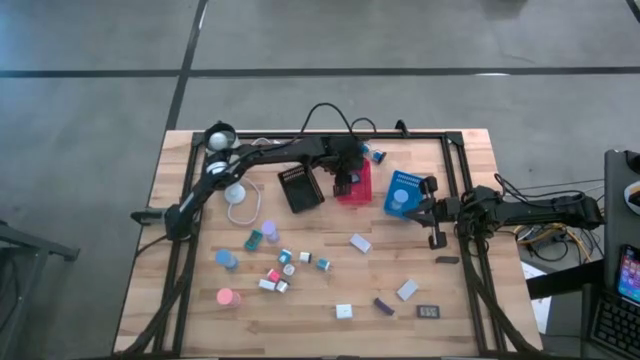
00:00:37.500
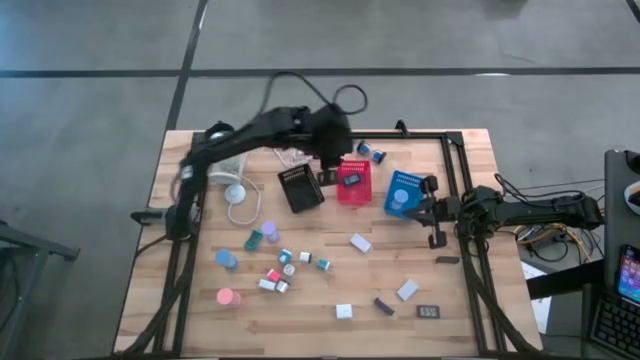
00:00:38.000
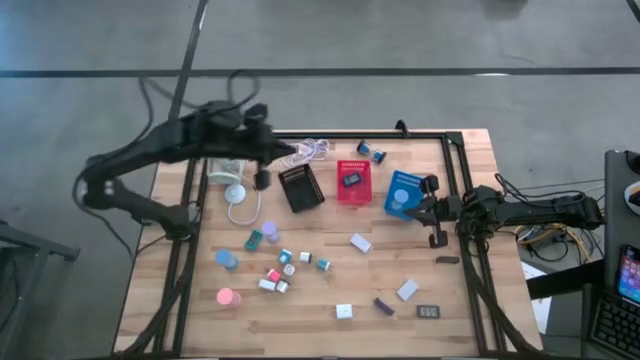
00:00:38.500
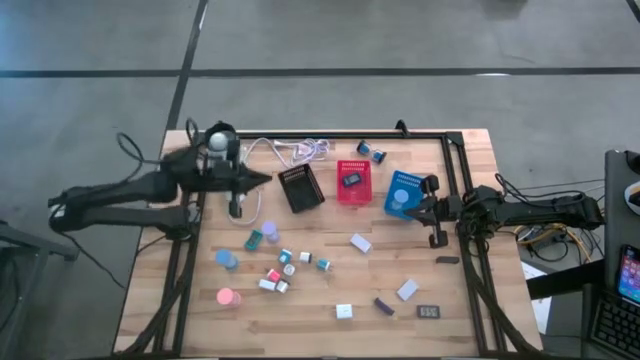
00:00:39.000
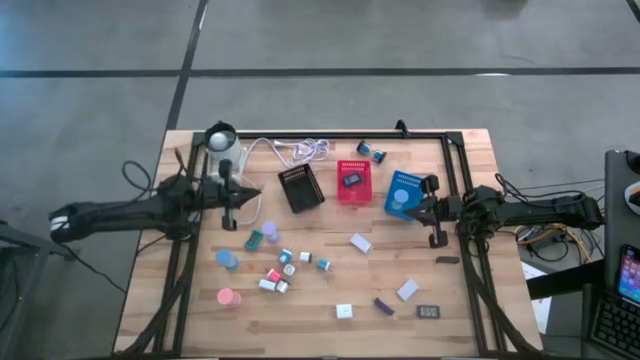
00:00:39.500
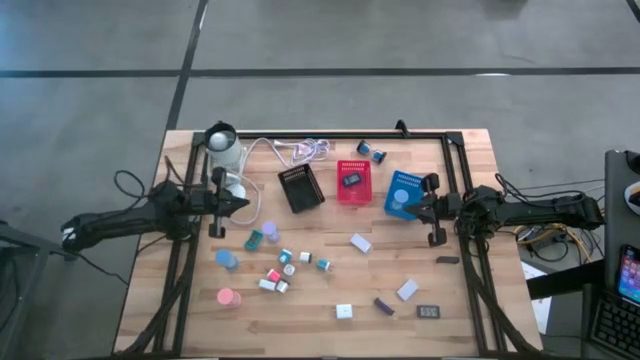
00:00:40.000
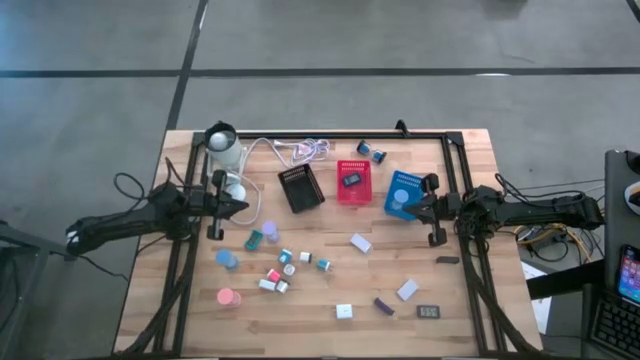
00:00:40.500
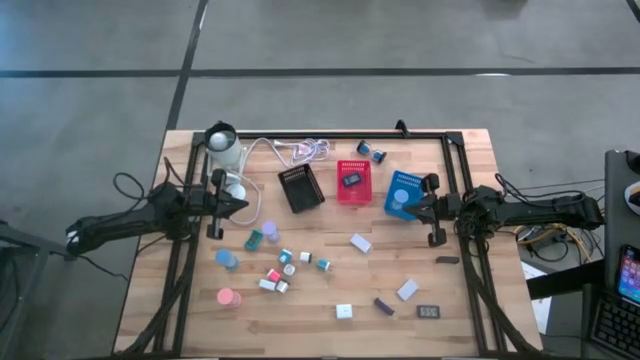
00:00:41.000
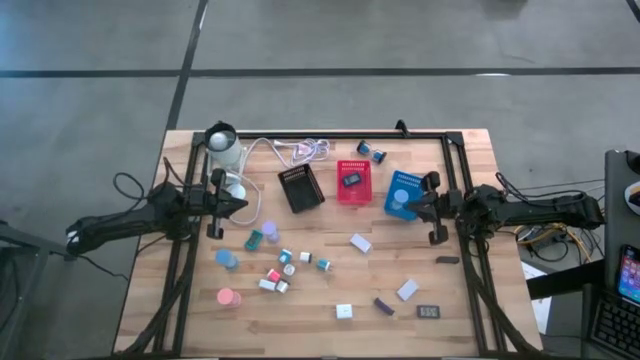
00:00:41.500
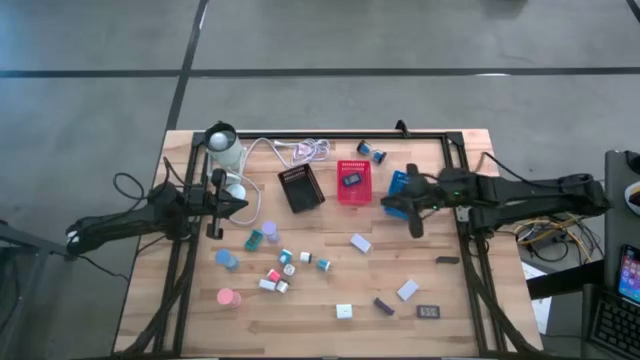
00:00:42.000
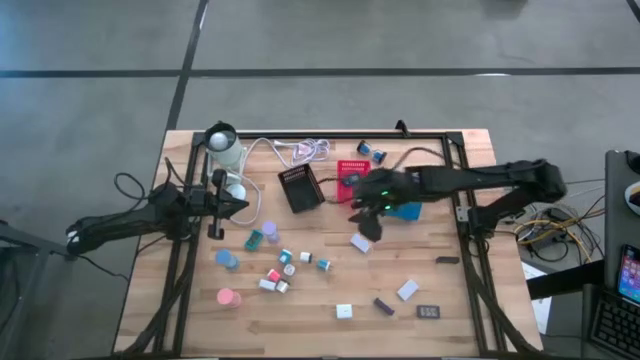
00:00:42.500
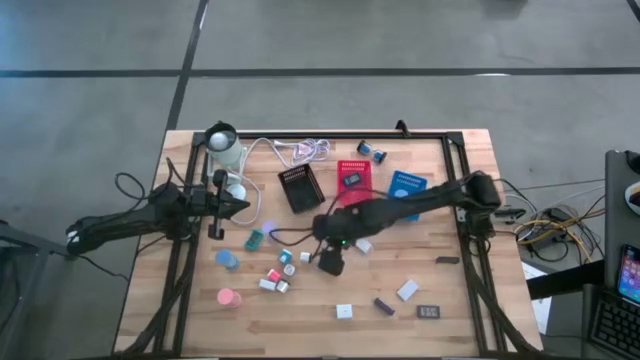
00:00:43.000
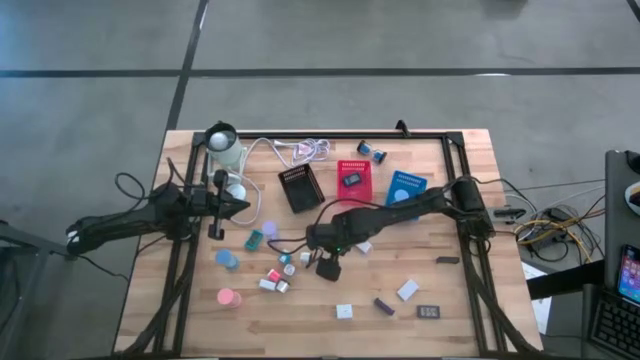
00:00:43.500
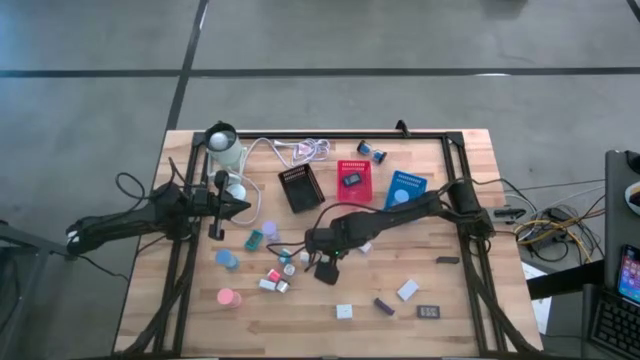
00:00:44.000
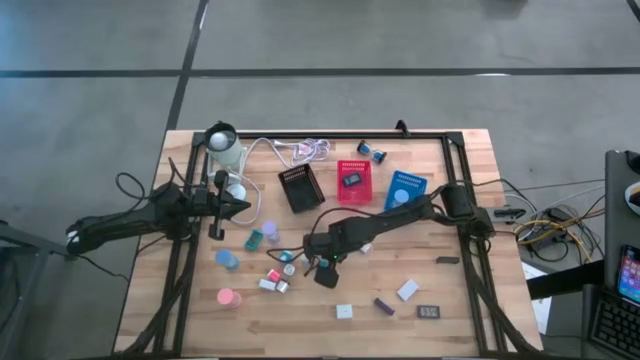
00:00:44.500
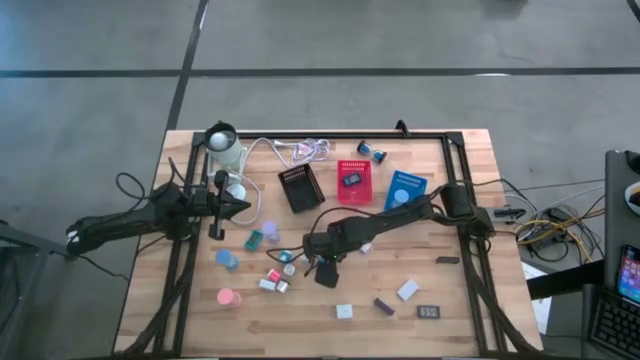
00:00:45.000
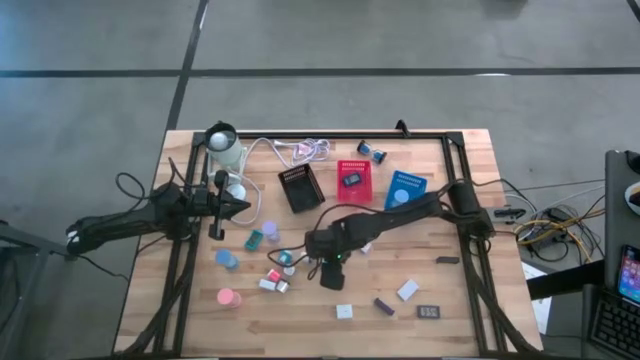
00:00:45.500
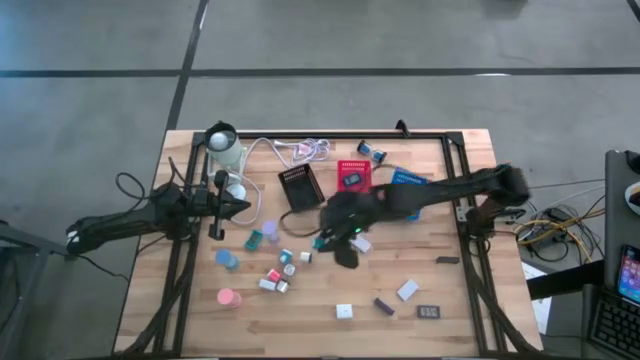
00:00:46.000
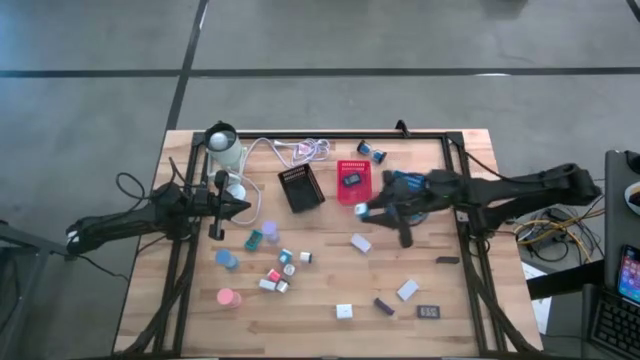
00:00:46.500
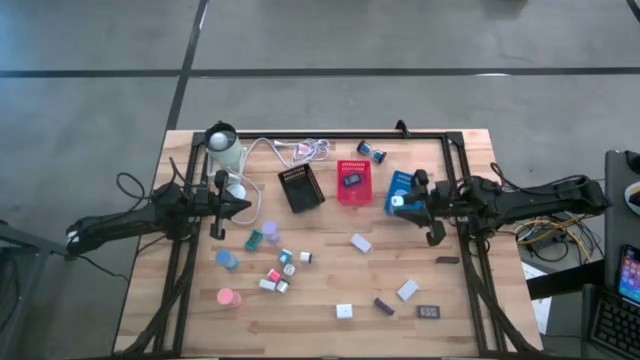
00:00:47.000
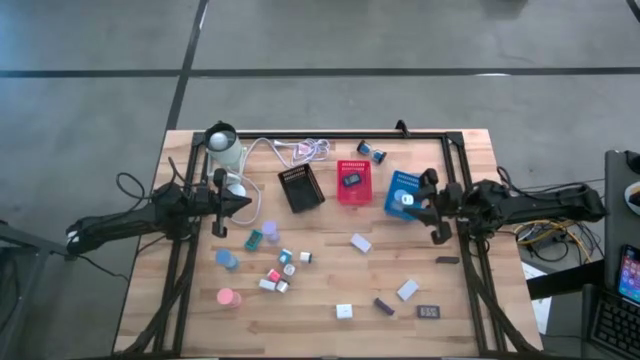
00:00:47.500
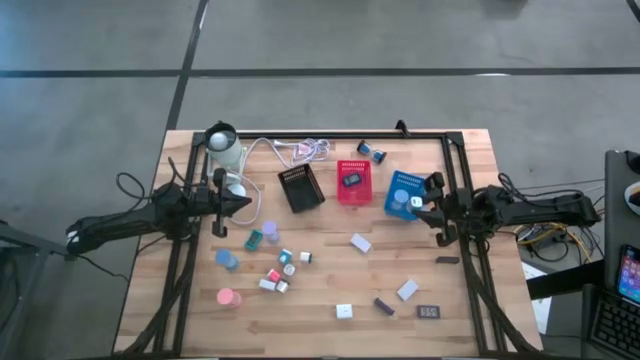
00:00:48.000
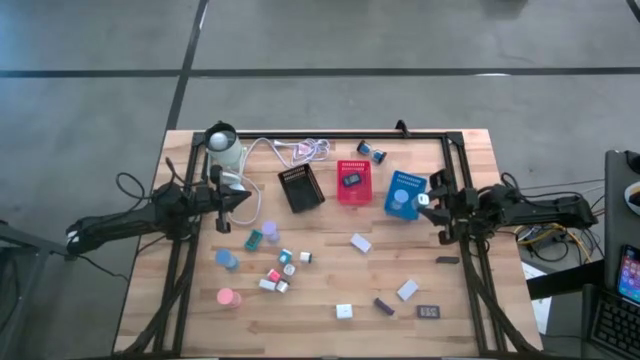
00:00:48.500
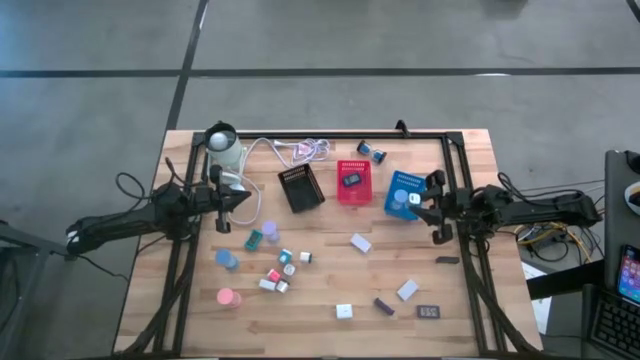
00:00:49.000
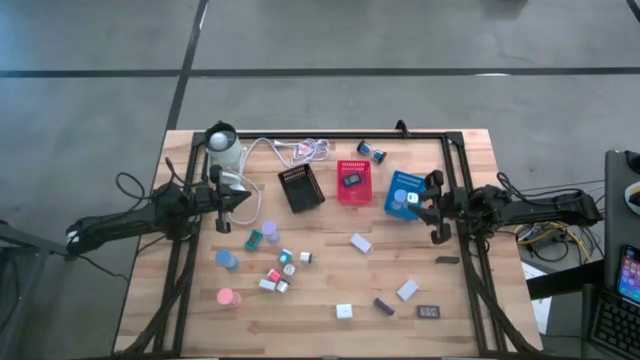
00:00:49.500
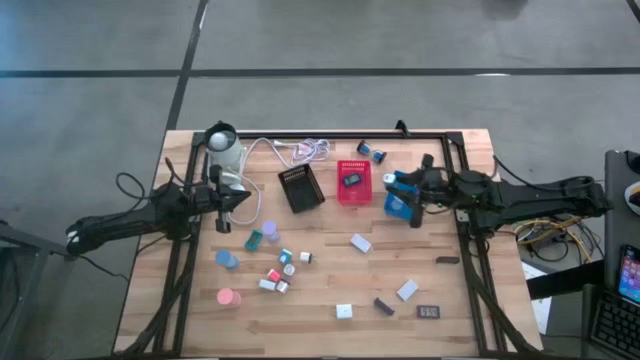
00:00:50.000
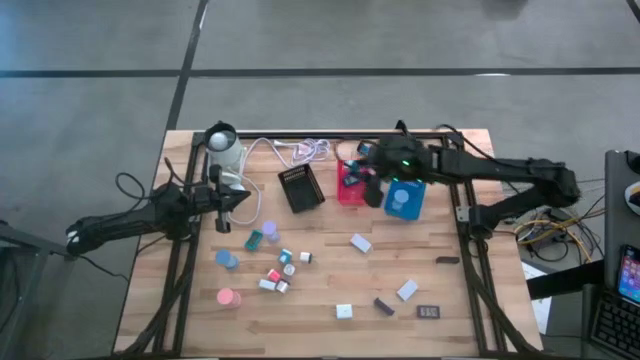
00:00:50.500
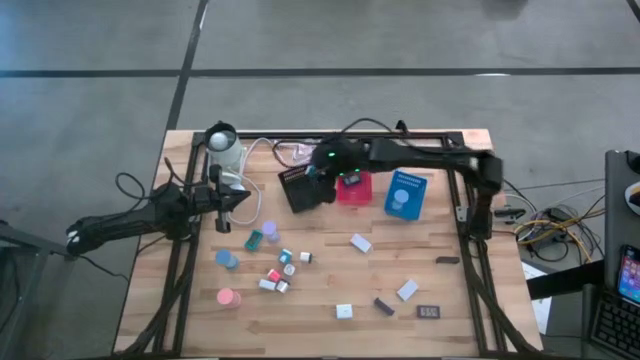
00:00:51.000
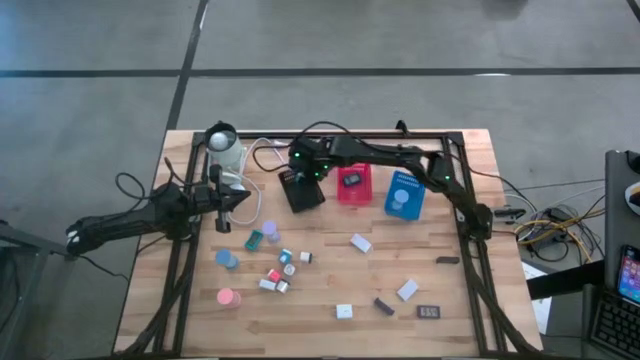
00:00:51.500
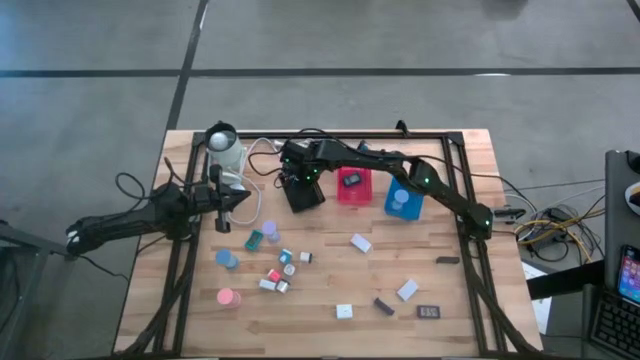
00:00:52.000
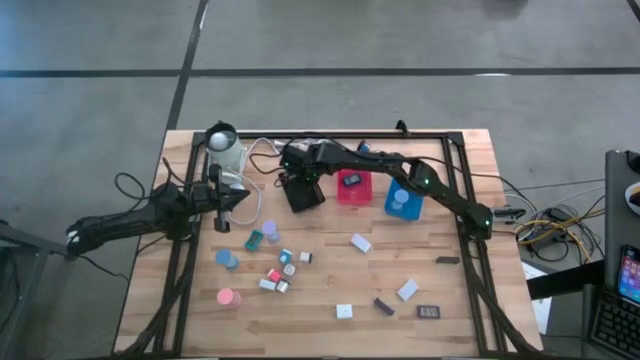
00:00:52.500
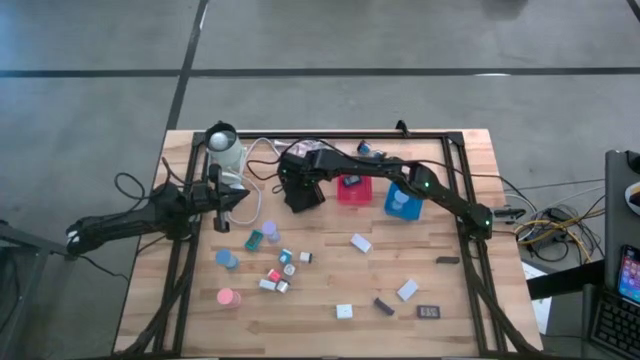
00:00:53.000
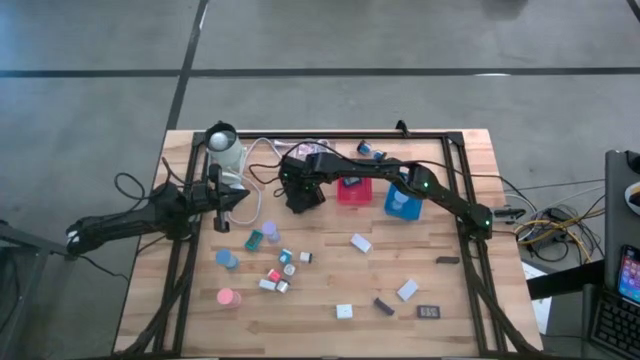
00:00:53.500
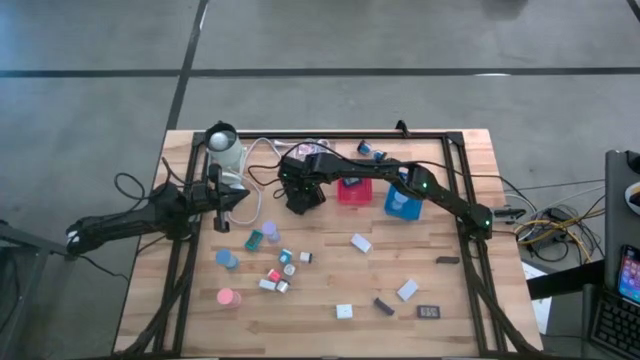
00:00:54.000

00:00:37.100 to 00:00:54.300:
Task: Pick & Place Office items
Put the right blue charger adapter into the black bin

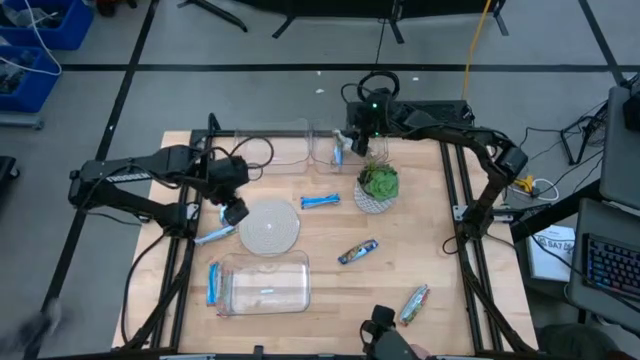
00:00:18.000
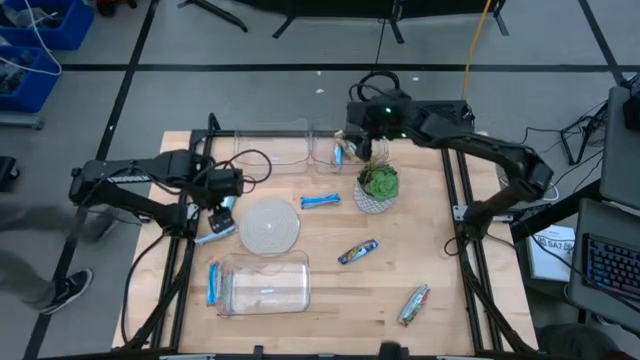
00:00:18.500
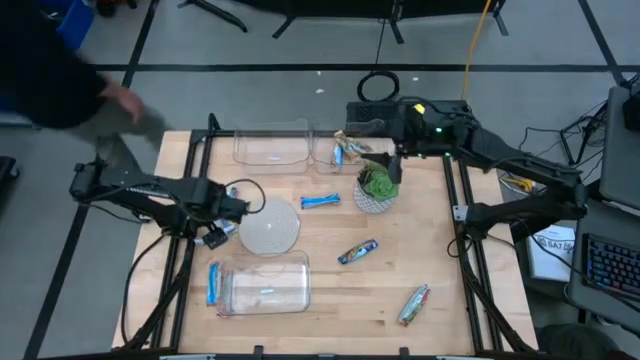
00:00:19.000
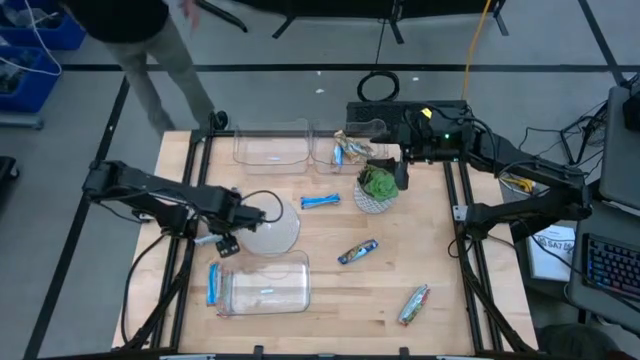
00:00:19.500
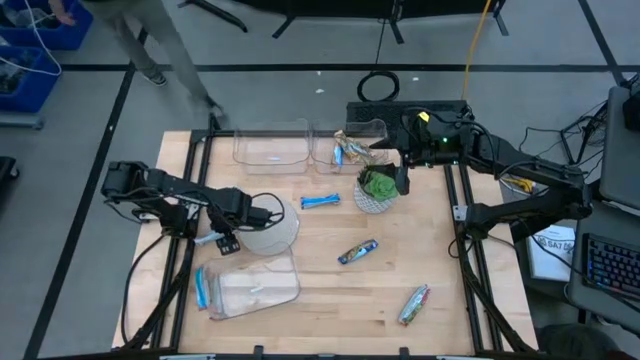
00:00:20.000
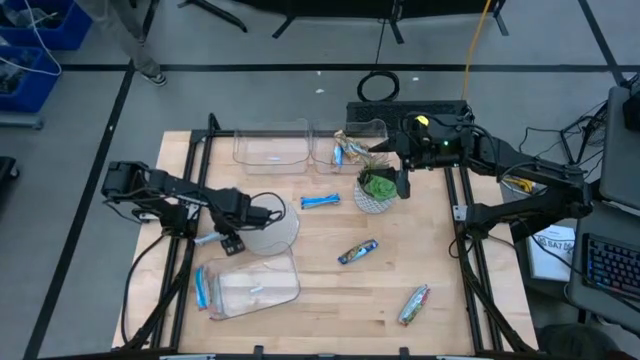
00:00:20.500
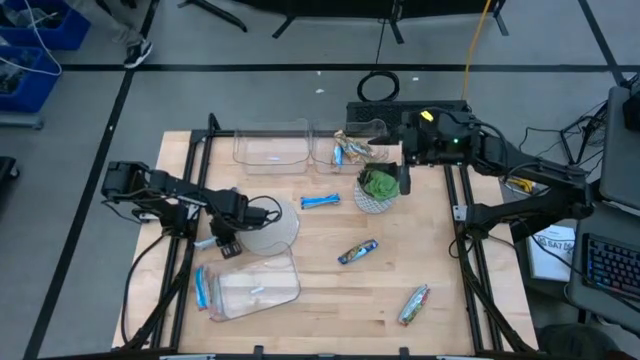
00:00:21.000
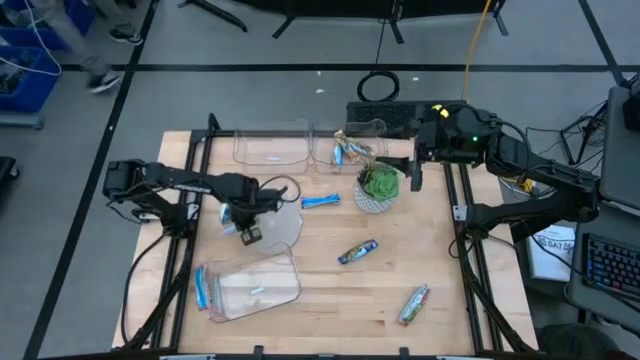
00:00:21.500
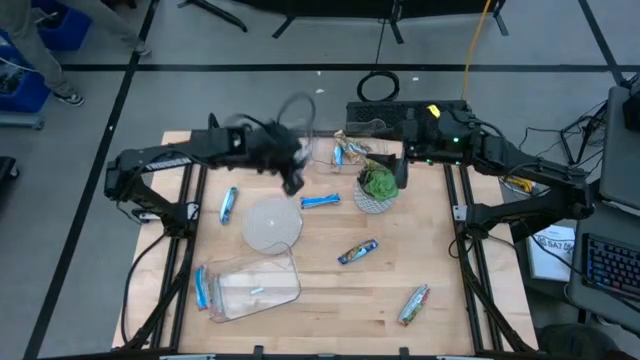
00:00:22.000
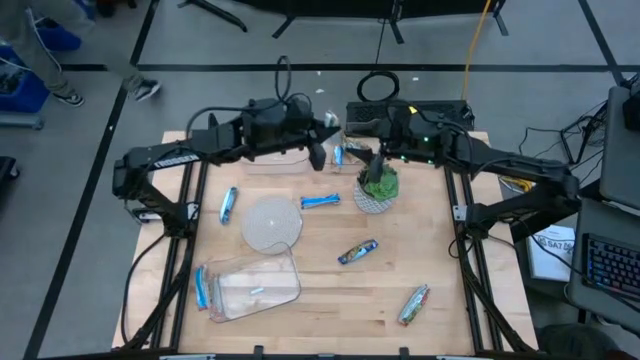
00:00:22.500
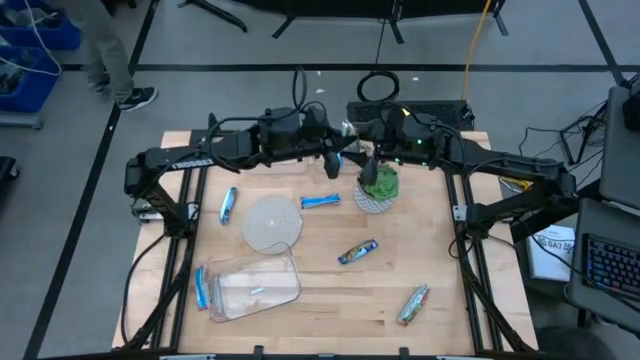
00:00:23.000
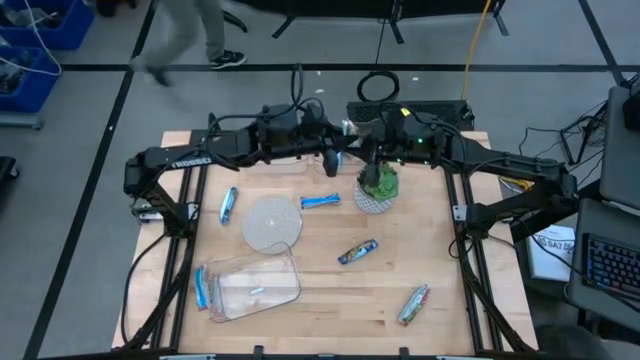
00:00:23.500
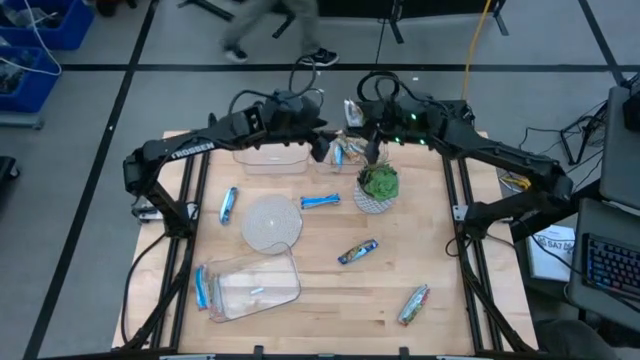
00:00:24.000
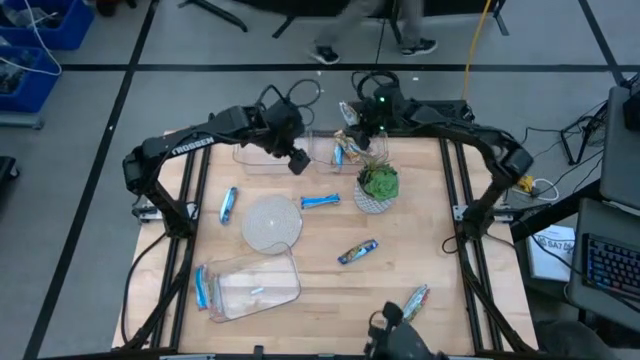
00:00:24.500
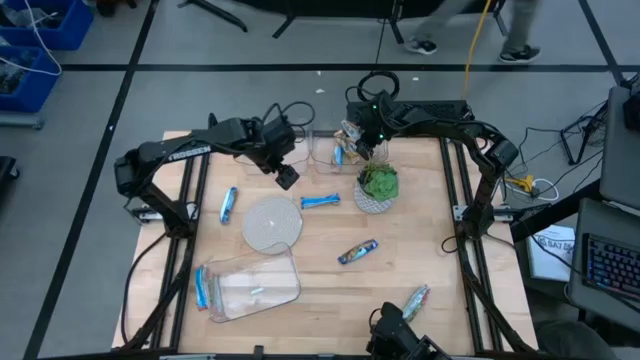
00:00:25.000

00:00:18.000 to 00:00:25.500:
Task: Pick and place Granola Bars by type
Put the yellow granola bar into the top right transparent bin
